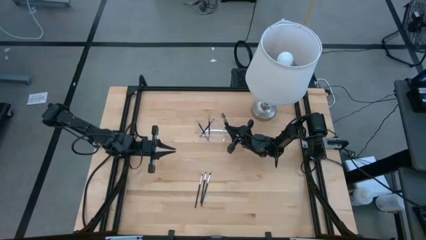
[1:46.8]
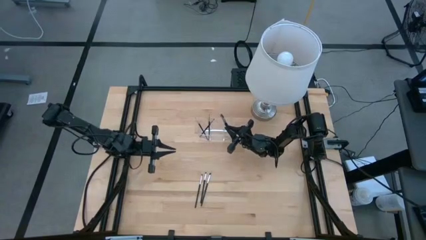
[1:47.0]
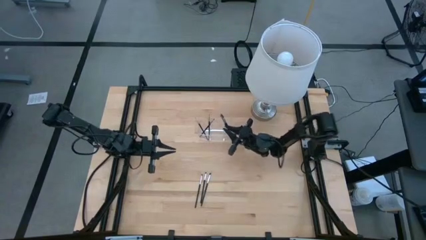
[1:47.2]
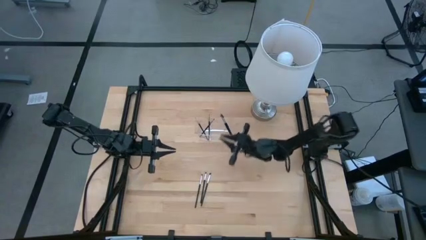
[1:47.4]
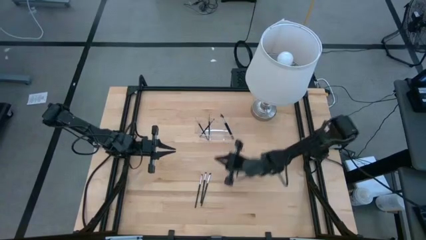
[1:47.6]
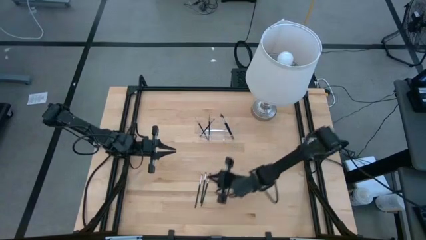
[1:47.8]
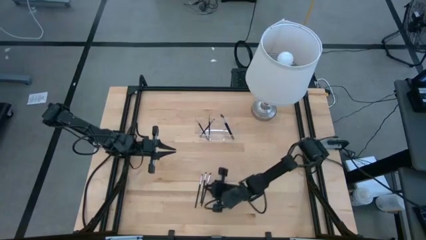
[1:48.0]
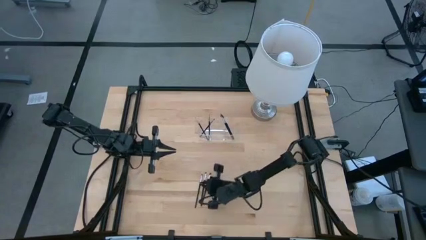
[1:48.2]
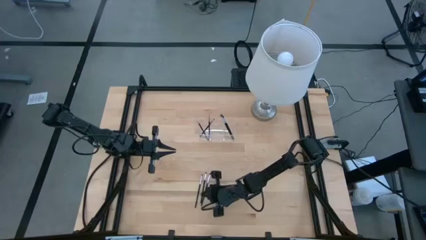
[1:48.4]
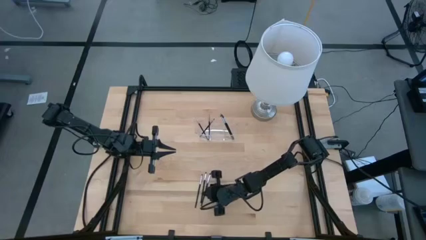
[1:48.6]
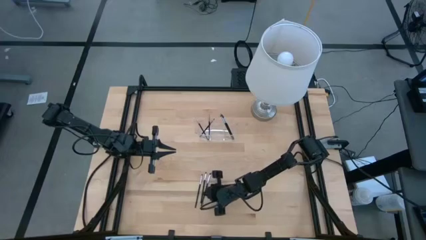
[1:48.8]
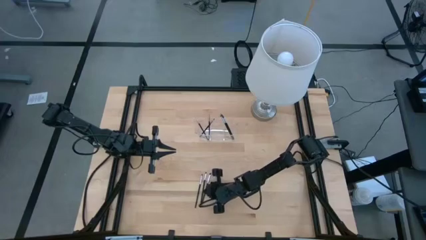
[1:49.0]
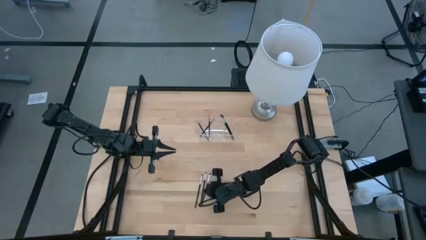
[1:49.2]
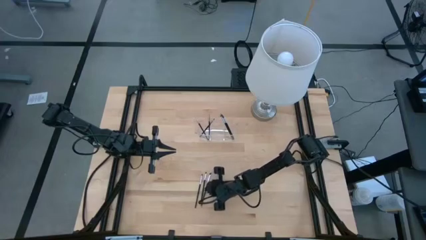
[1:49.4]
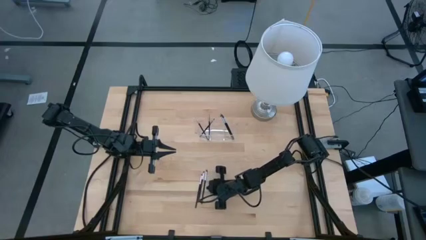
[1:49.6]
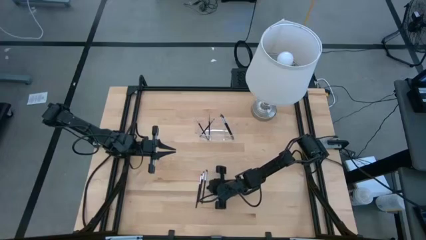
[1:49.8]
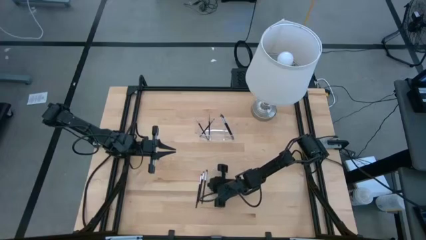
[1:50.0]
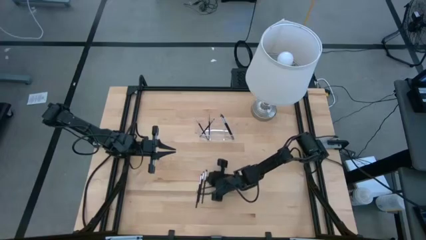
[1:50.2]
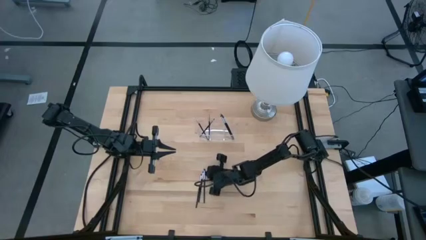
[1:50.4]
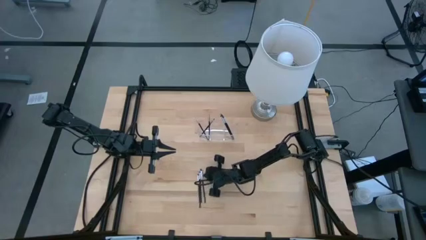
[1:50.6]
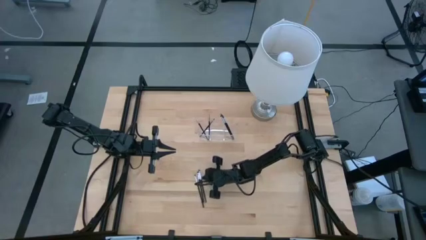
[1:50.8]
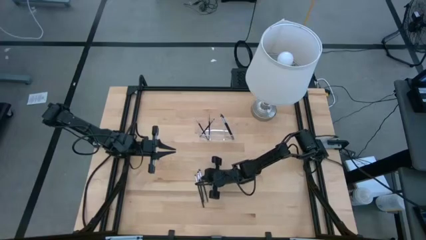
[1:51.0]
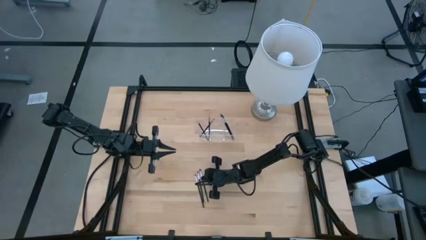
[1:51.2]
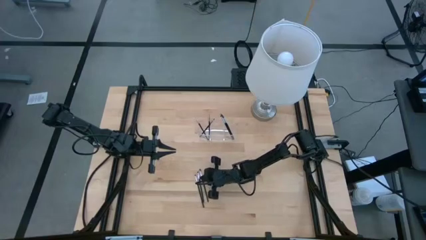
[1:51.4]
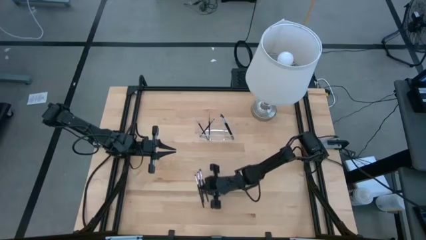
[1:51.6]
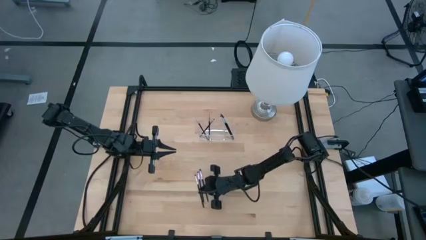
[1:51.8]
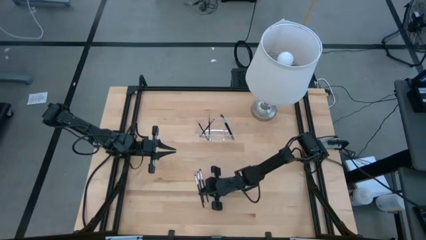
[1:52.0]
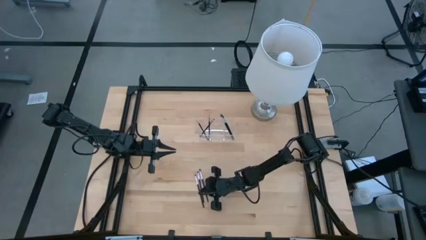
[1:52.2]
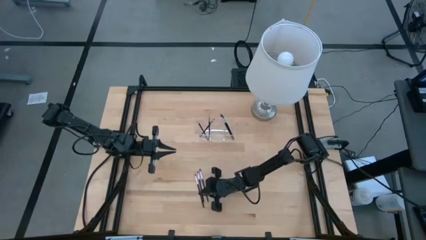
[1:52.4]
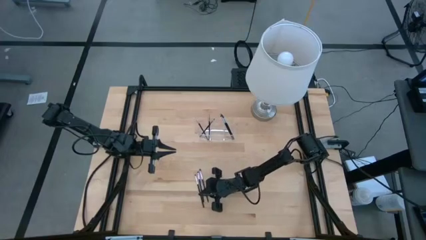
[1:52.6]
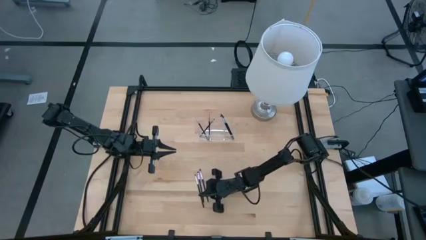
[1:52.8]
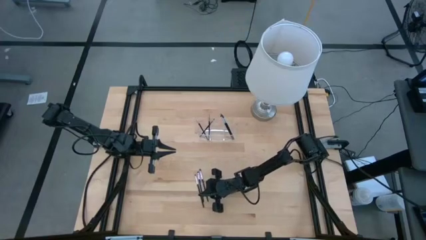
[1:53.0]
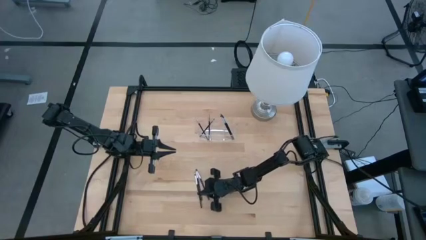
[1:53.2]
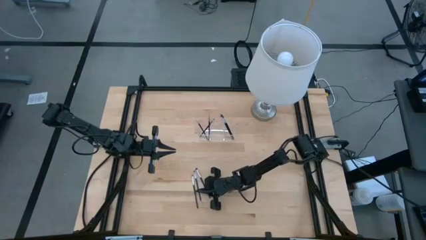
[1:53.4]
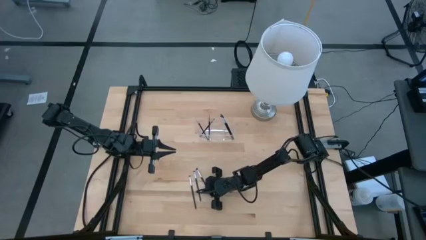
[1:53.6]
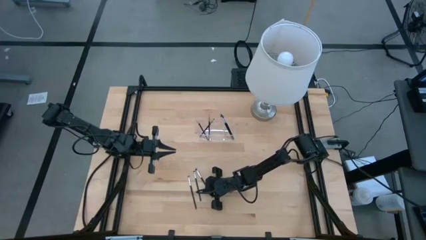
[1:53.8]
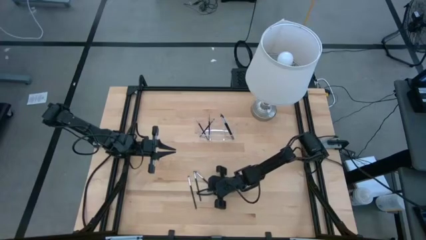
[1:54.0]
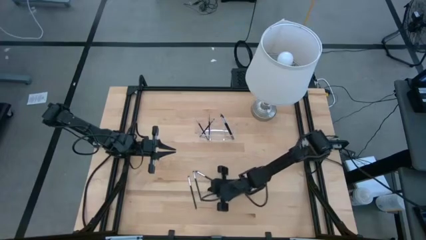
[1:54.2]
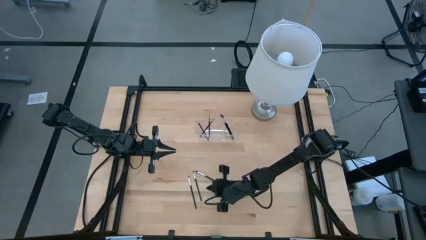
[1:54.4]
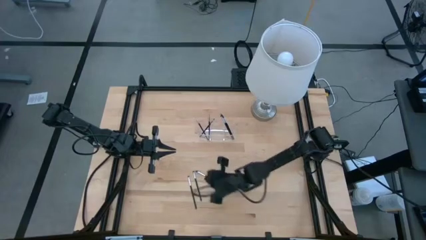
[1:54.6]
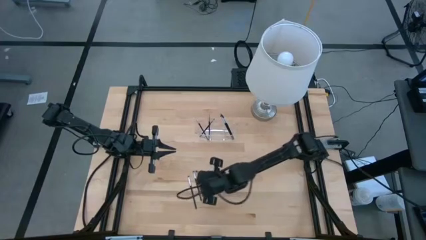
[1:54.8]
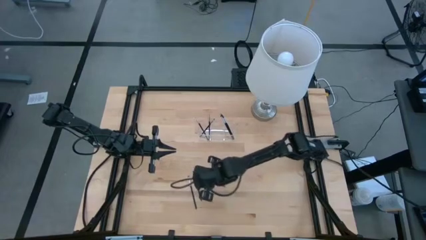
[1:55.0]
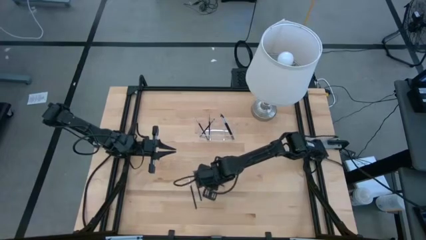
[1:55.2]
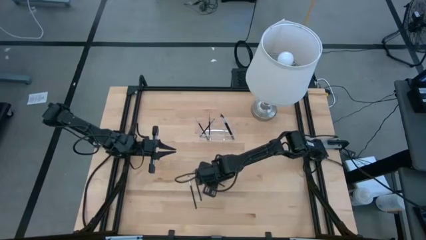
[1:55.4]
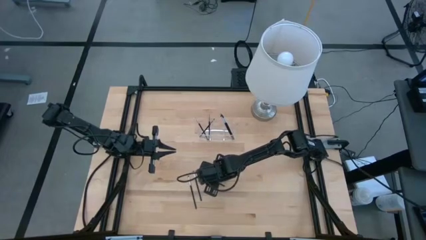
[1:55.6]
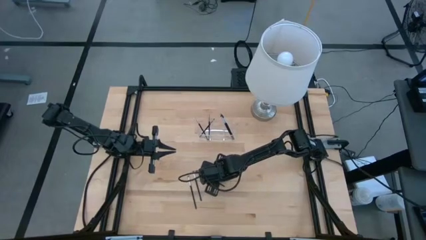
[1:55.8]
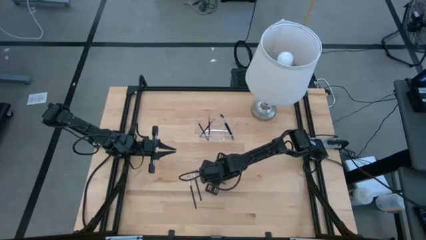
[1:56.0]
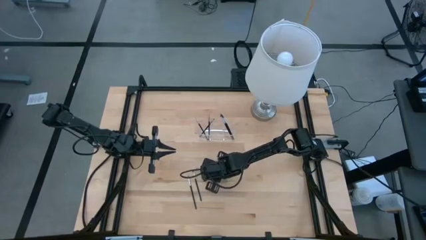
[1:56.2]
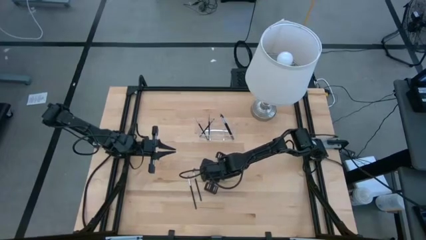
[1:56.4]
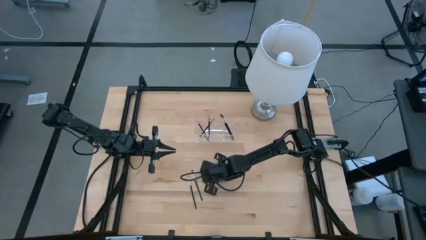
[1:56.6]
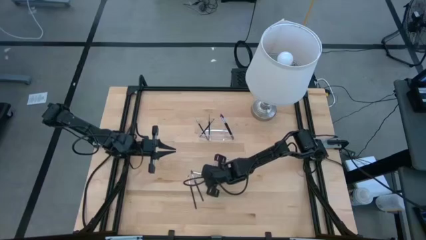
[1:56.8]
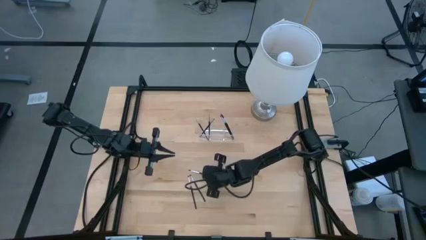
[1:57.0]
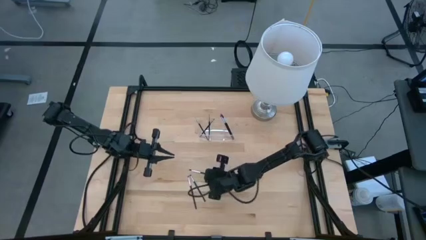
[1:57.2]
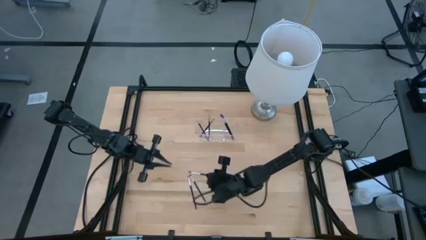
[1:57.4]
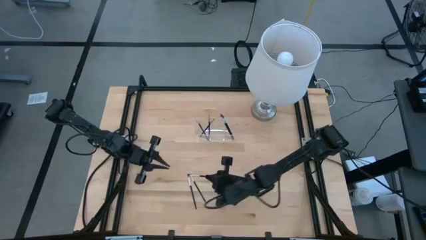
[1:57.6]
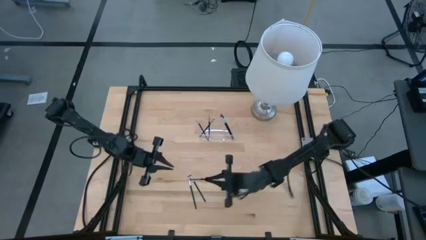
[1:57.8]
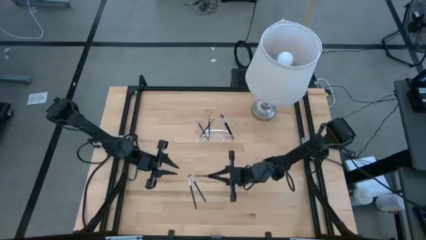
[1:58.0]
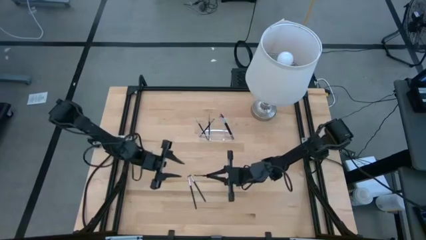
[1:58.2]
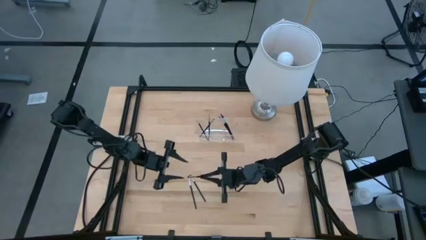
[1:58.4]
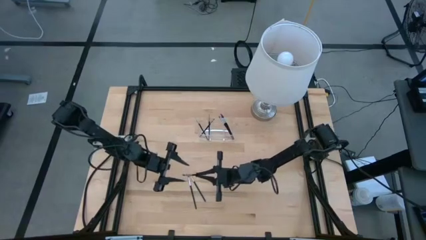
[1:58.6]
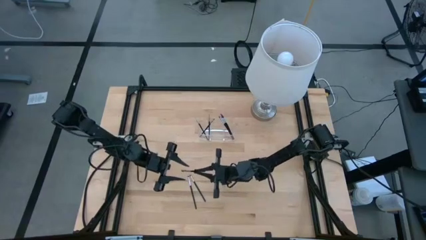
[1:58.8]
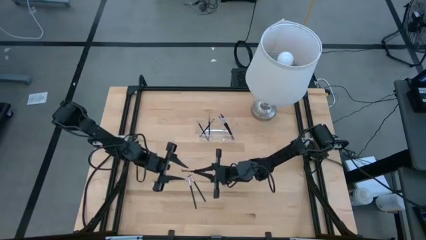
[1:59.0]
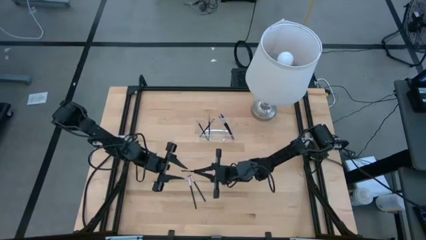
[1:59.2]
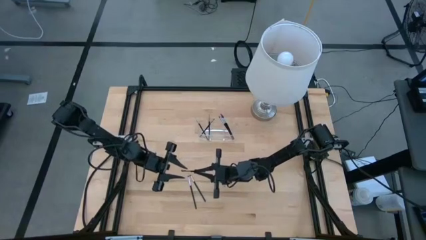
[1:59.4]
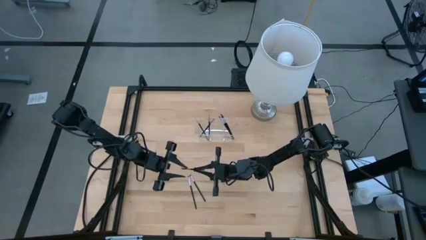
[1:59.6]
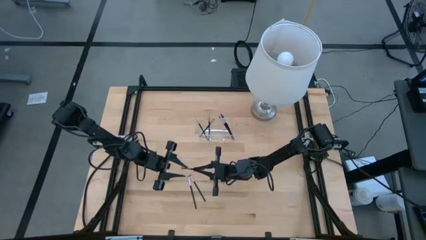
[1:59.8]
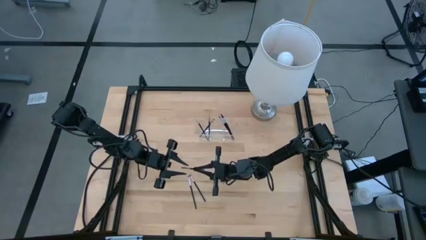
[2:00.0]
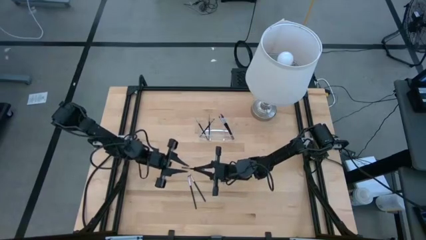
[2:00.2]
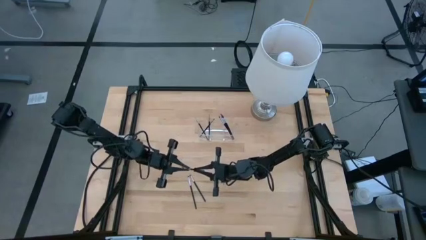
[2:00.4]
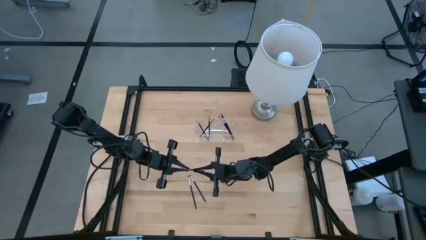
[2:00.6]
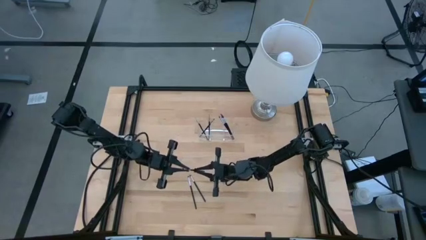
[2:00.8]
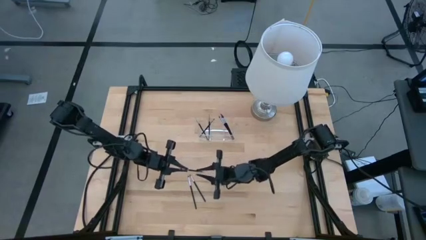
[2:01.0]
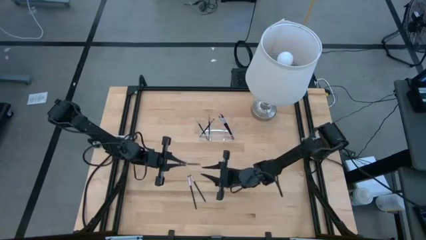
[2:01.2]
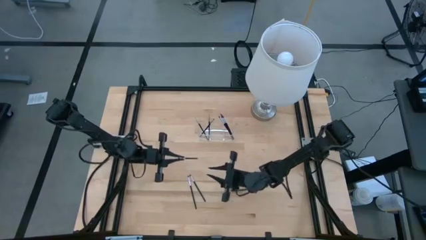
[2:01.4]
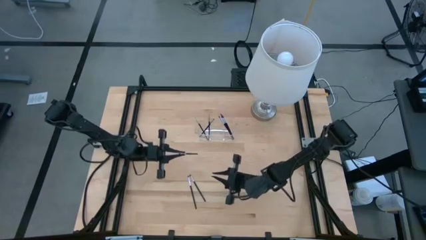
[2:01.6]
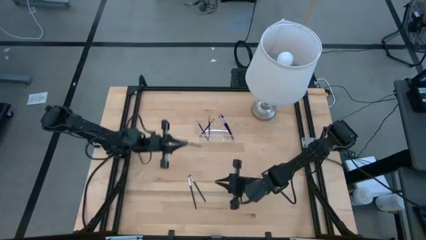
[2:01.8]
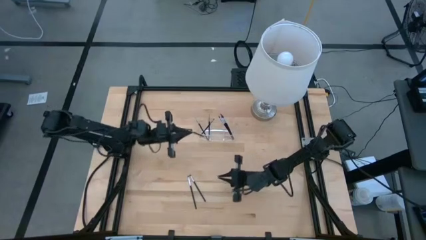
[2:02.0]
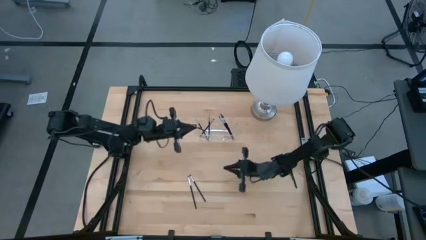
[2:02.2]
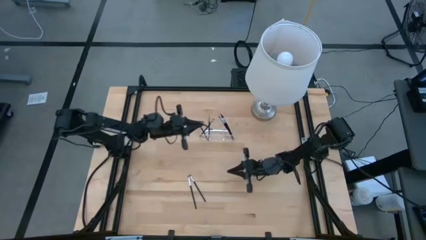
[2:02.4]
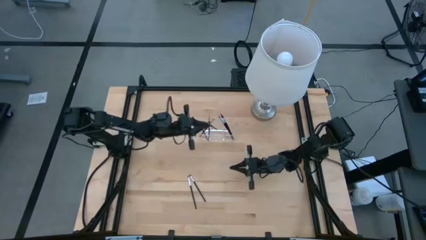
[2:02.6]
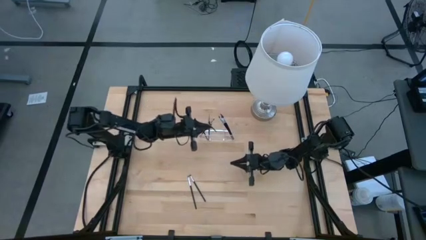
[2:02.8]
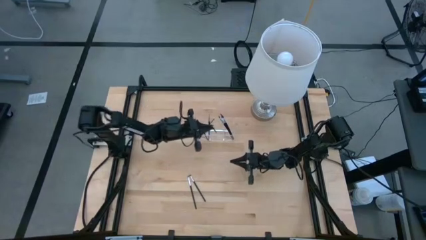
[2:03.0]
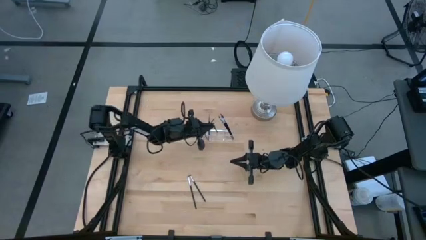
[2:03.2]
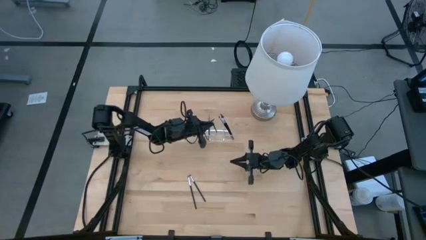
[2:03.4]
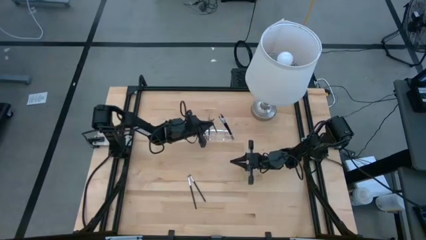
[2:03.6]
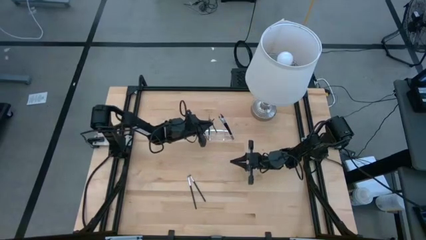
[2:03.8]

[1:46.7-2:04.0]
Task: Put items in baskets/containers
Put the black foundation brush transparent organizer
